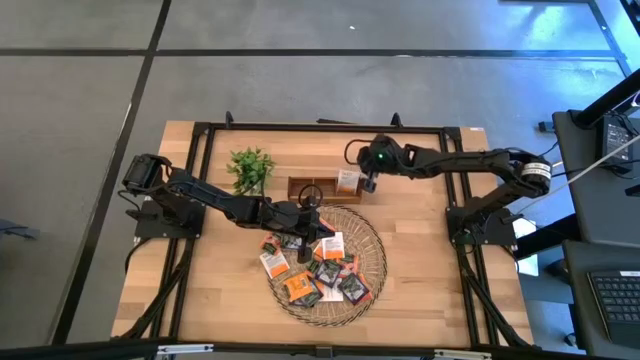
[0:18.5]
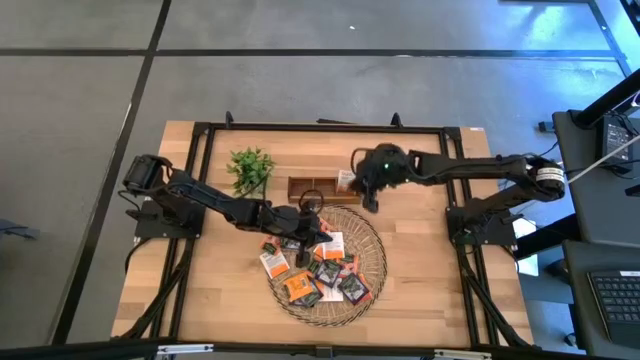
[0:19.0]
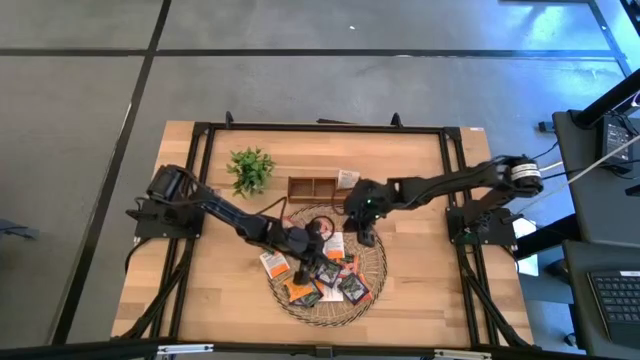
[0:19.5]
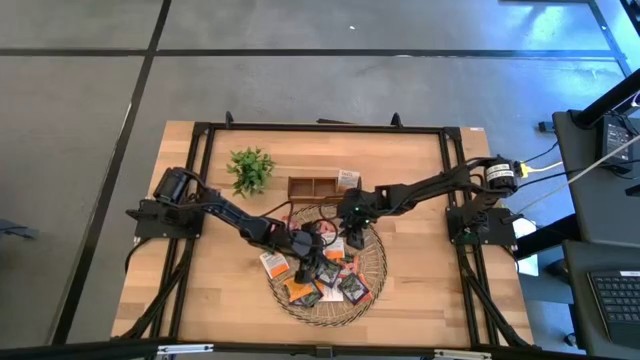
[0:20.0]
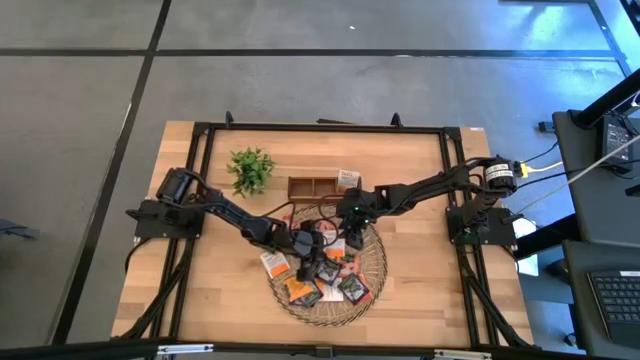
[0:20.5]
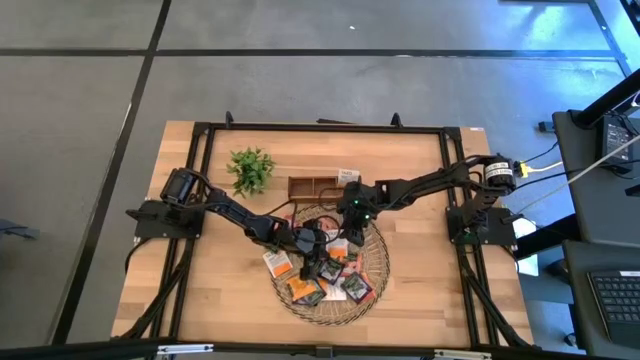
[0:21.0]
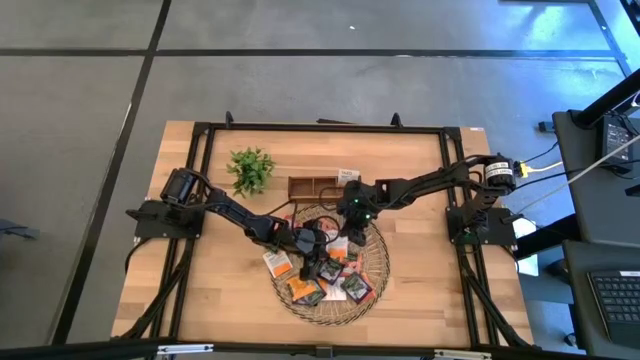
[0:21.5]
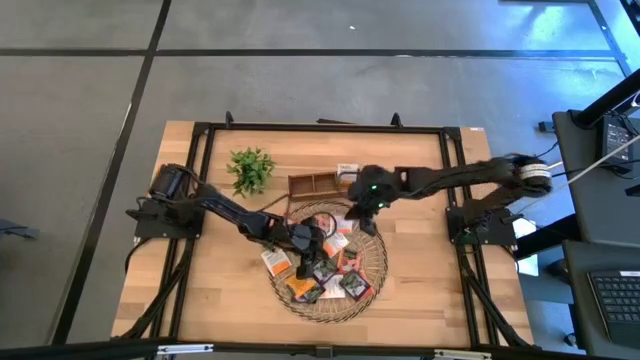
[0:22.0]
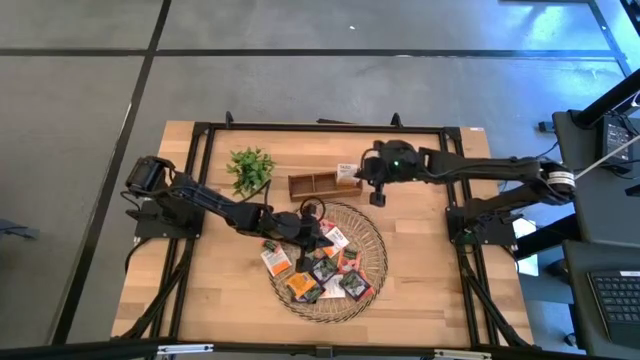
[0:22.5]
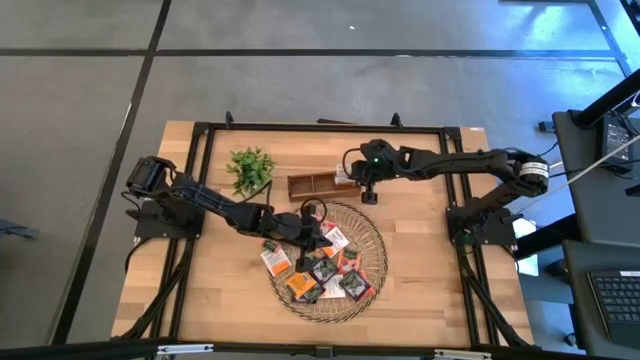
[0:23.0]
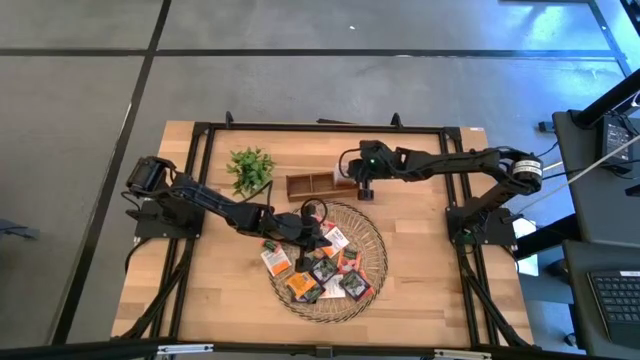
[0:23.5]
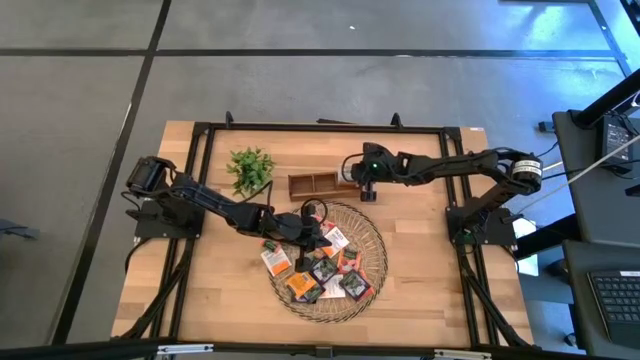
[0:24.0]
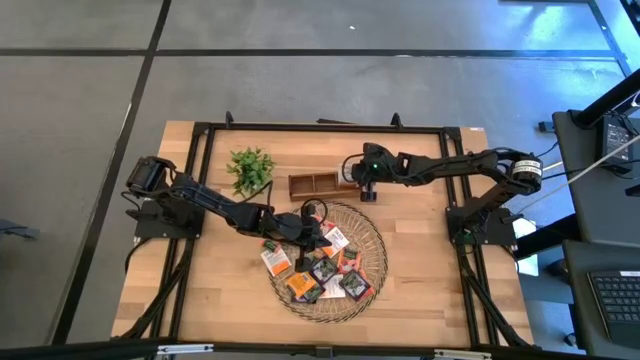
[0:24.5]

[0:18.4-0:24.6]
Task: Pick & Place Tea
Put the white and orange tea bag into the right section of the wooden organizer

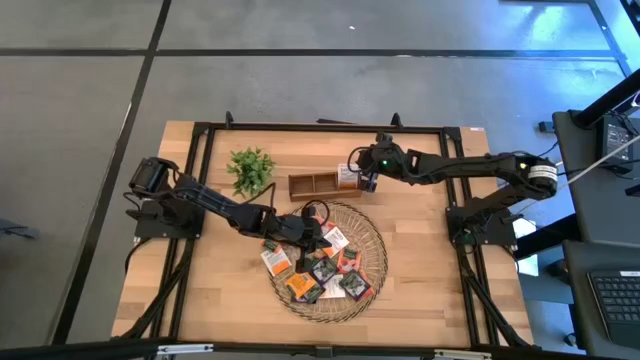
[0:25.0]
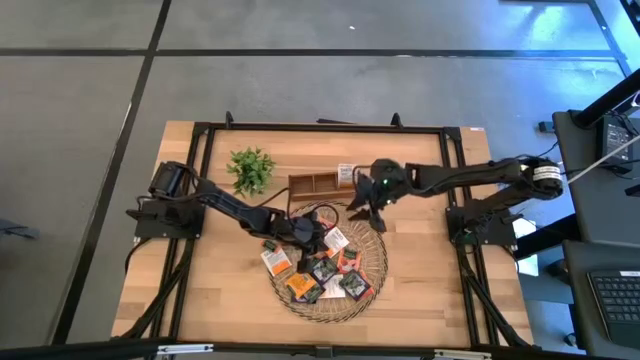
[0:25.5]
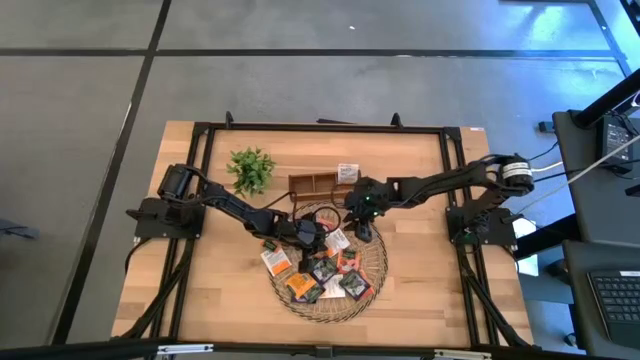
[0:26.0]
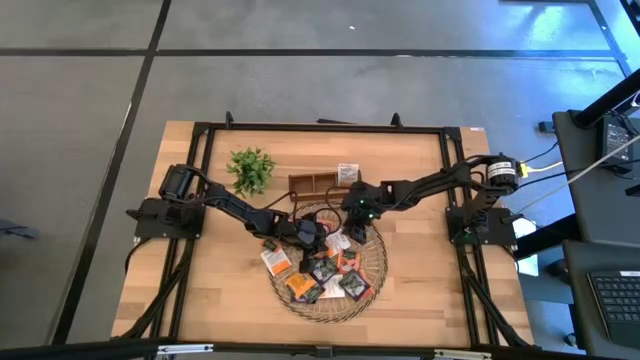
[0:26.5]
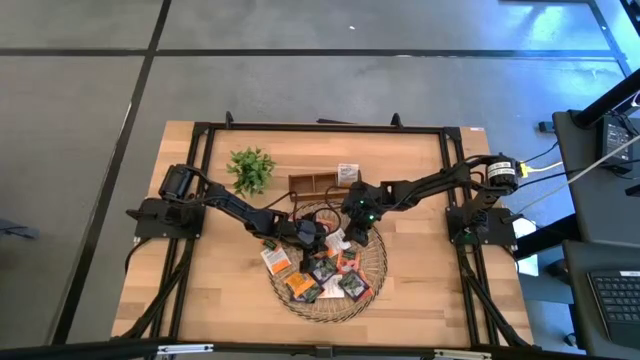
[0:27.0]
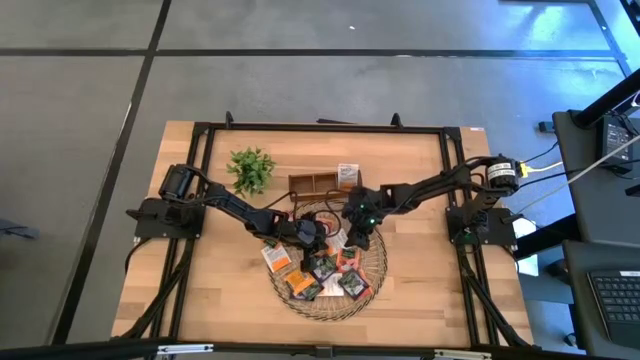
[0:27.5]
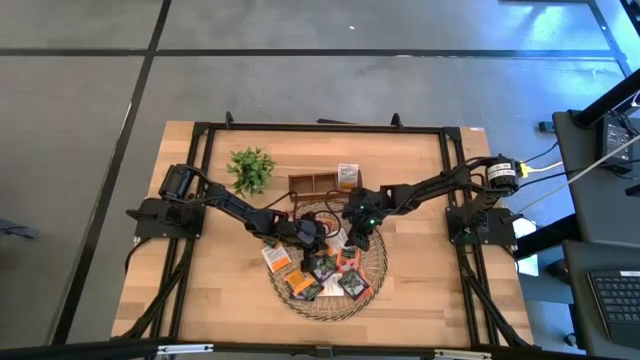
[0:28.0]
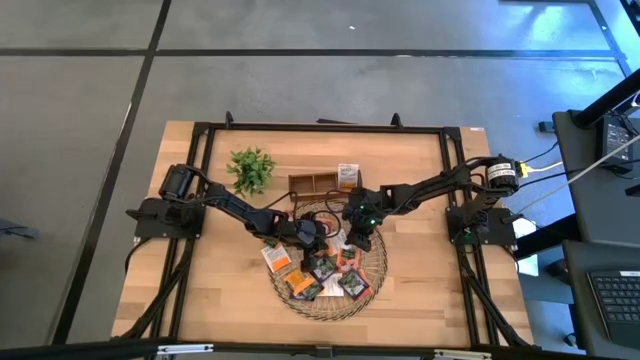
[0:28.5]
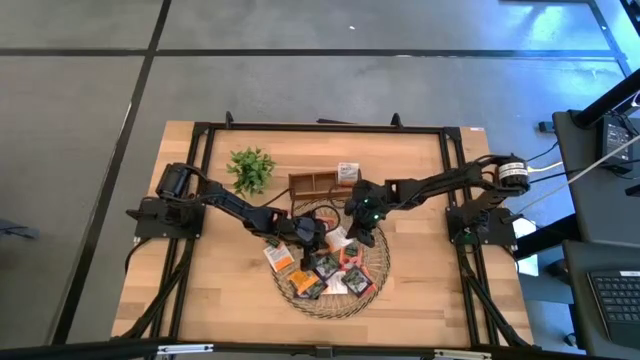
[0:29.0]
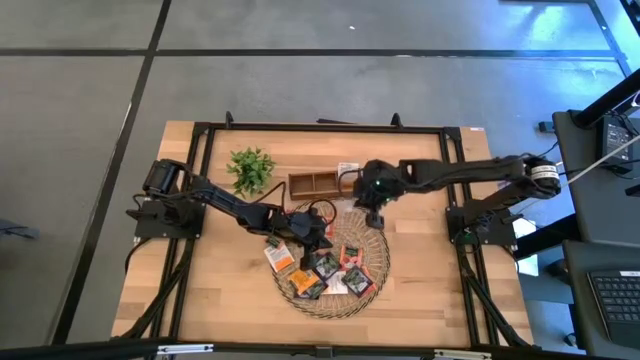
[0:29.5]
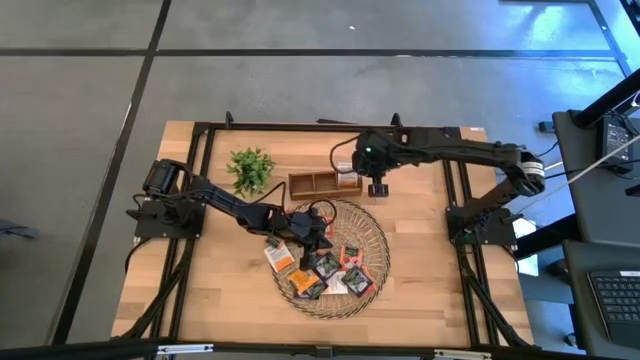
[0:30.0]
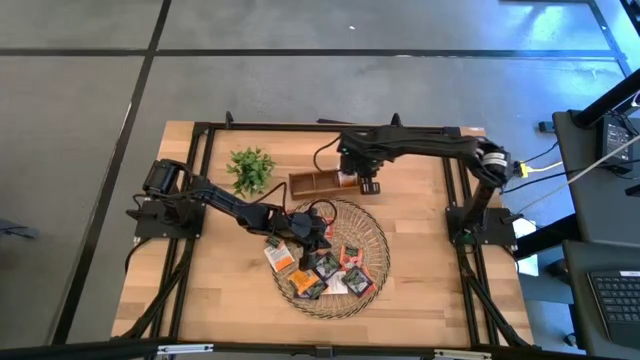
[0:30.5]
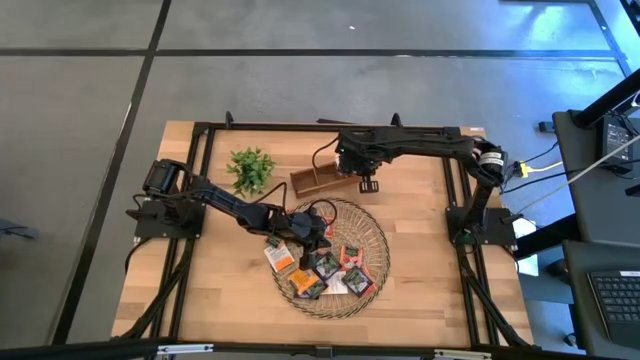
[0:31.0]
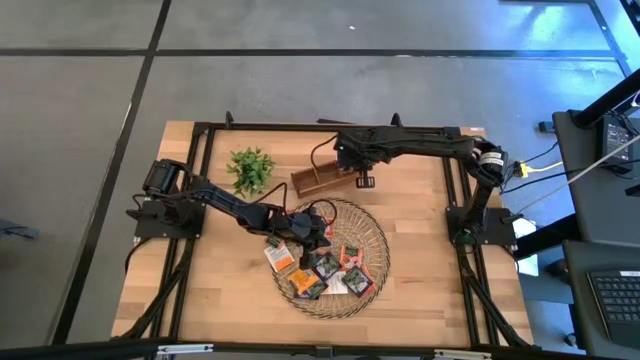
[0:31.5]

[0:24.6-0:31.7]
Put the white and orange tea bag into the right section of the wooden organizer

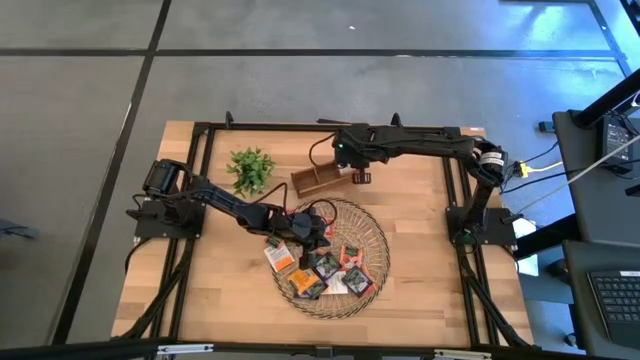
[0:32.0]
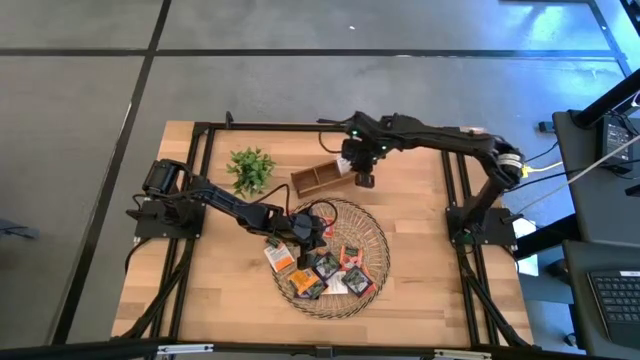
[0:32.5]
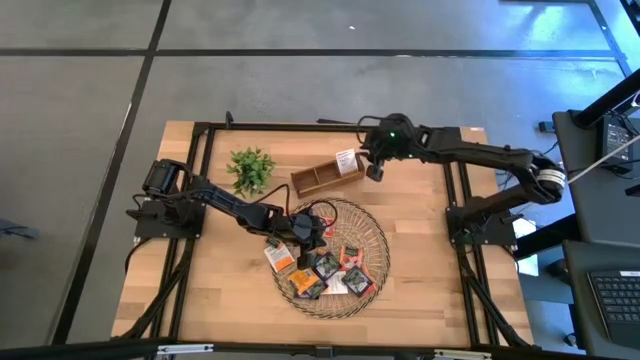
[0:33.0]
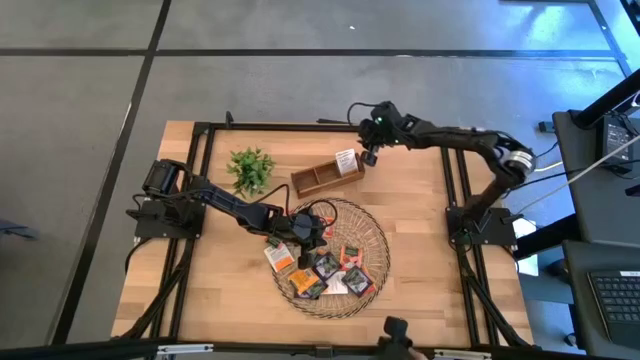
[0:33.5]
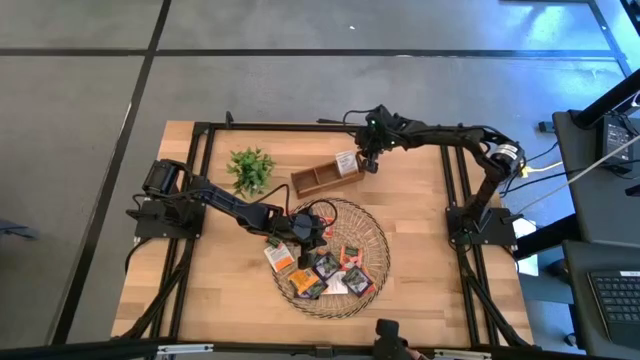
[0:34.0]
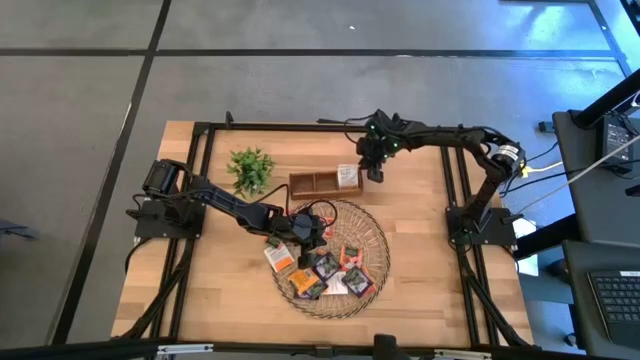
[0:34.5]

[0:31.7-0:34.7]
Adjust the wooden organizer on the table

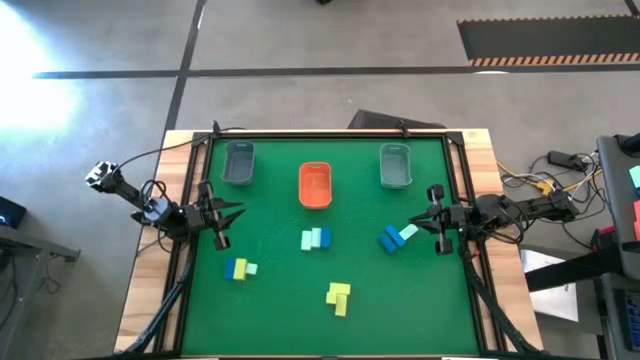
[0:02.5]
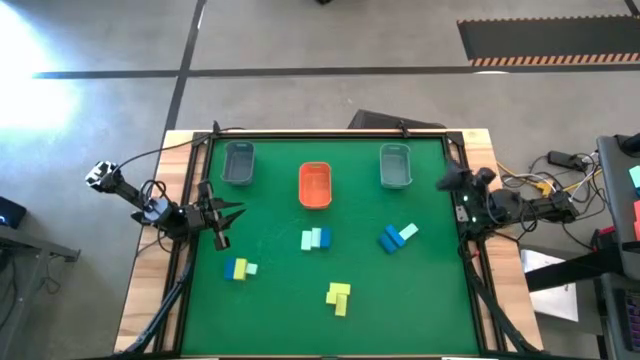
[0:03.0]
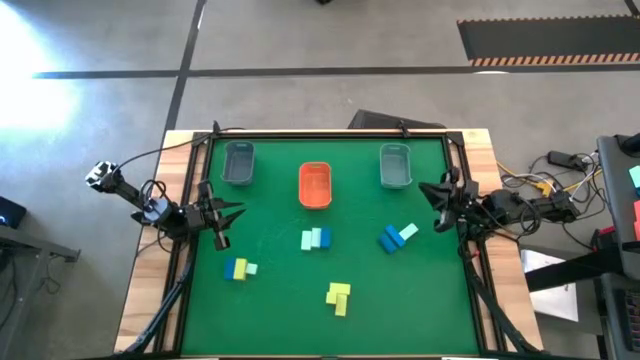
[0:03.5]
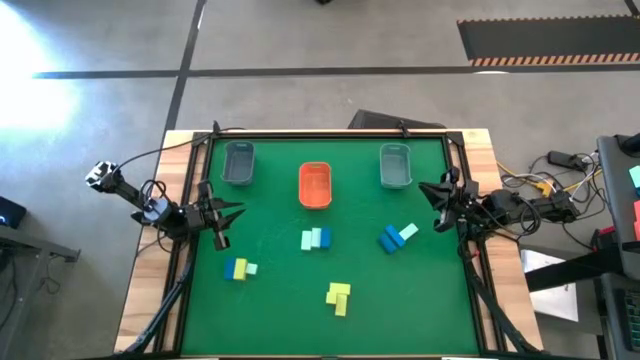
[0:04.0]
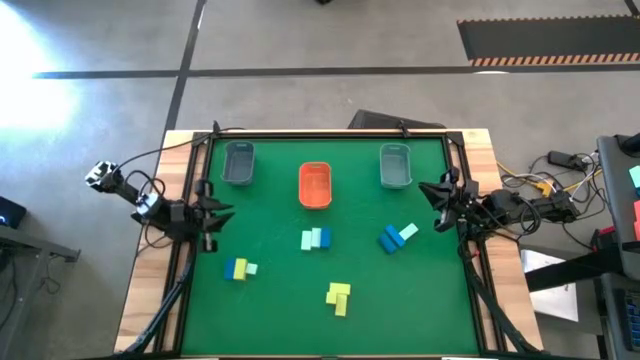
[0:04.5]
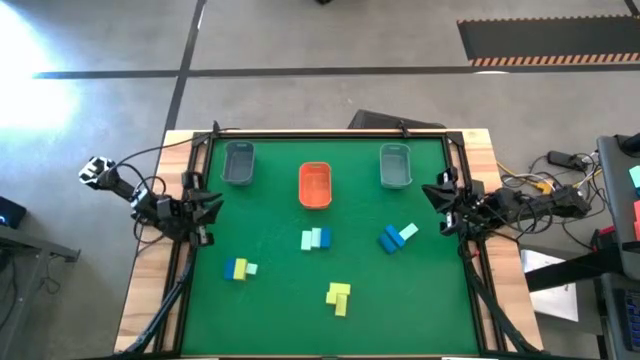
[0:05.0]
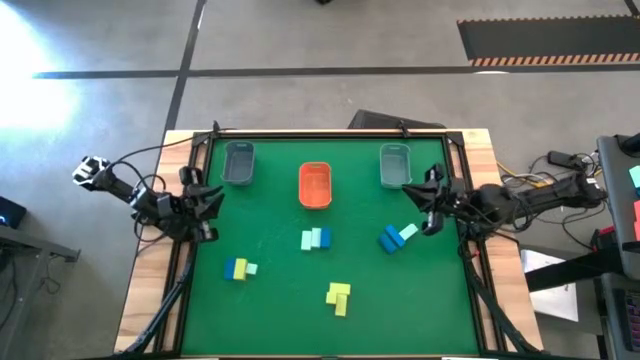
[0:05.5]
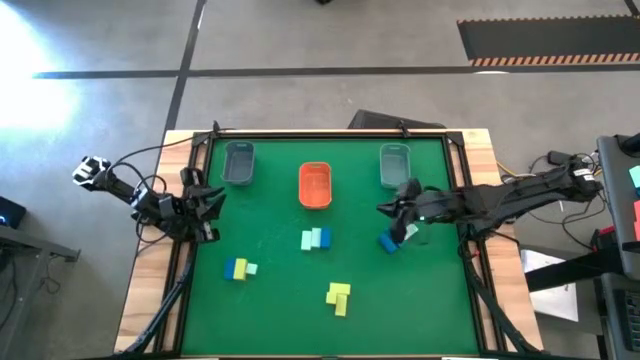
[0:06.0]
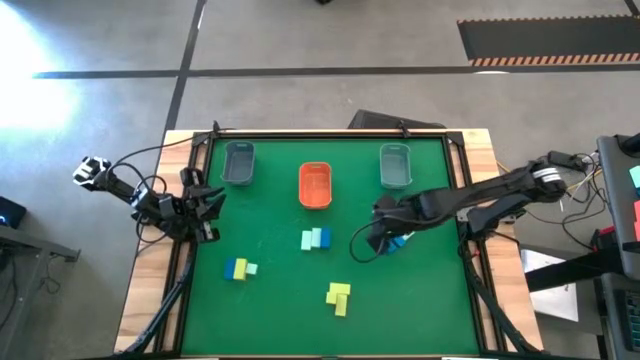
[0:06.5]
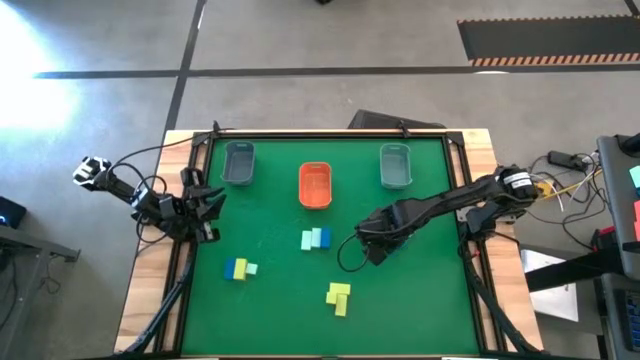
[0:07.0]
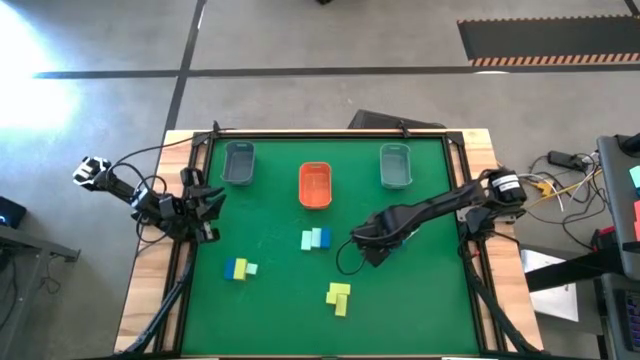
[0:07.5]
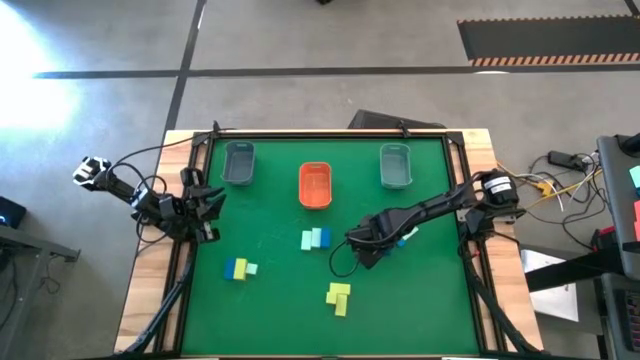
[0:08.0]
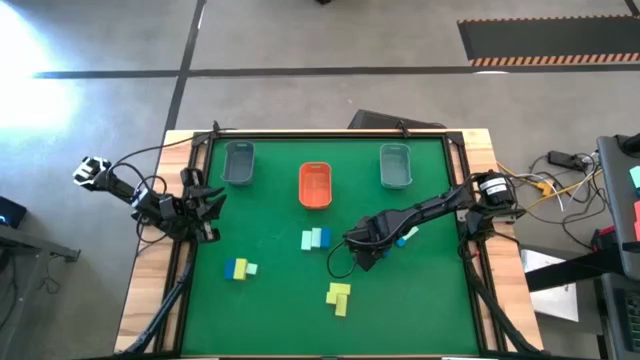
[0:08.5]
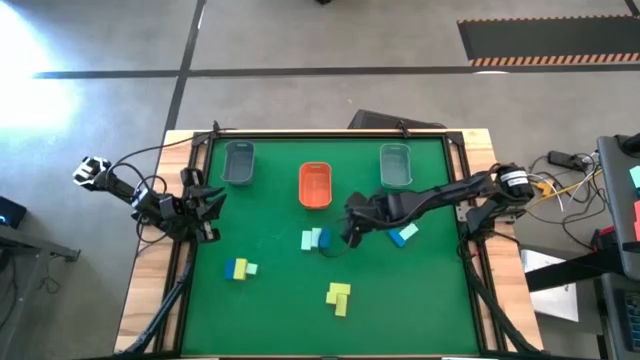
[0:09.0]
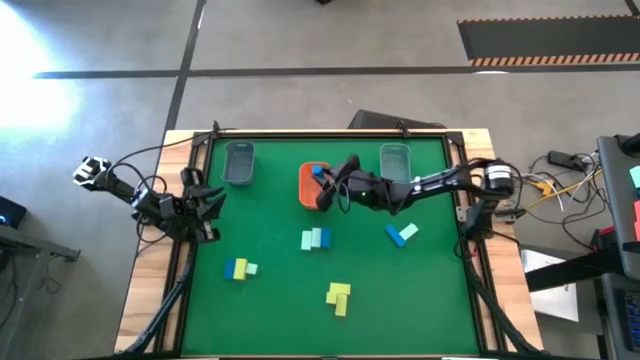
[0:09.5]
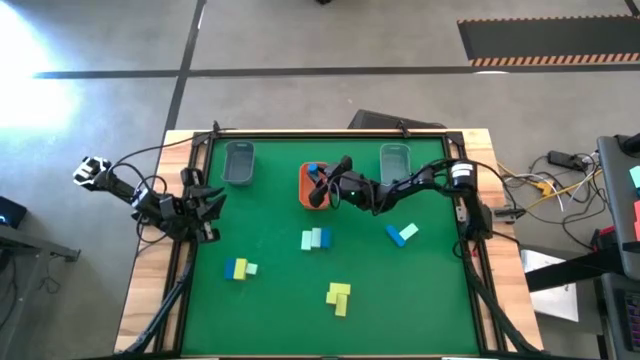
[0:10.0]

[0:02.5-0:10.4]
Task: Sort & place blocks by color
Put the dark blue wooden block into the orange bin
